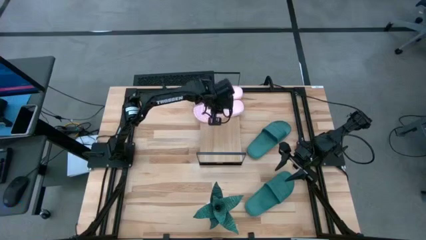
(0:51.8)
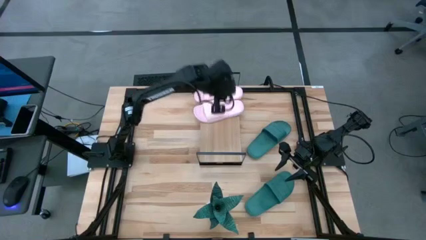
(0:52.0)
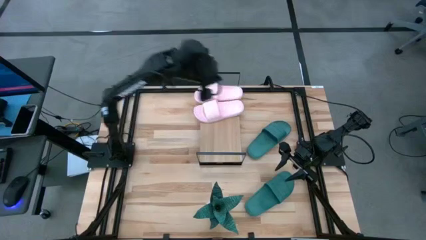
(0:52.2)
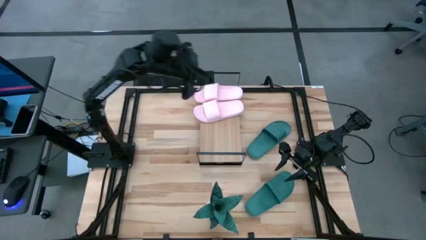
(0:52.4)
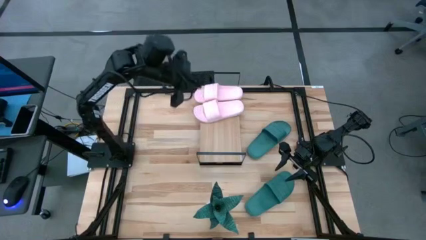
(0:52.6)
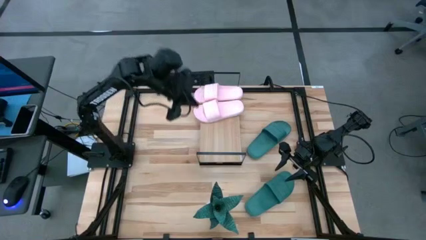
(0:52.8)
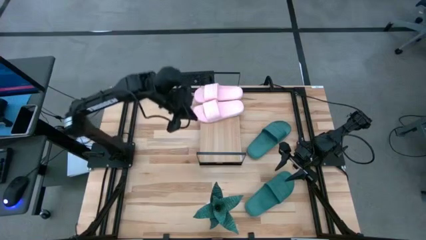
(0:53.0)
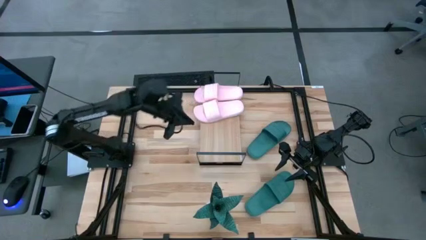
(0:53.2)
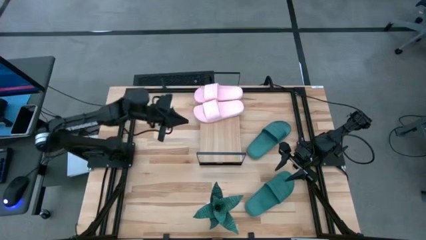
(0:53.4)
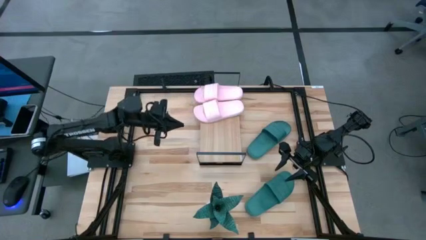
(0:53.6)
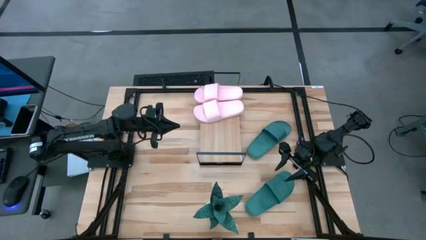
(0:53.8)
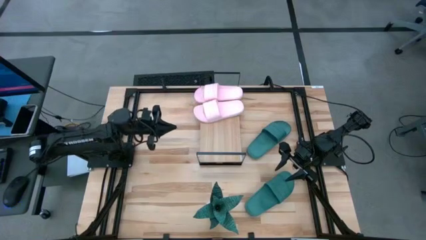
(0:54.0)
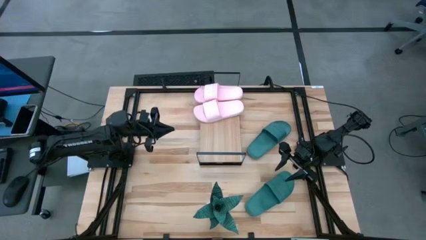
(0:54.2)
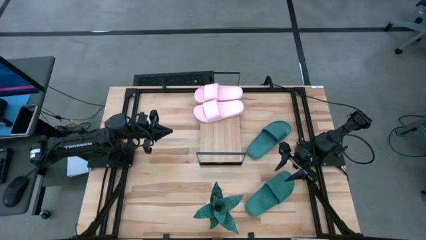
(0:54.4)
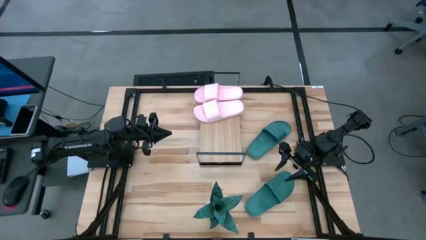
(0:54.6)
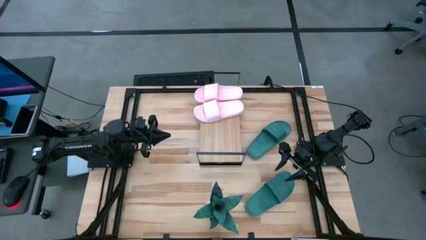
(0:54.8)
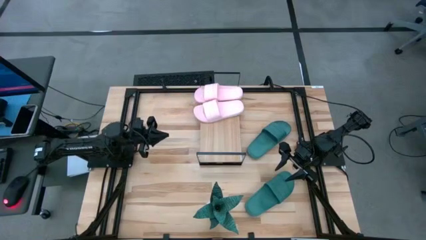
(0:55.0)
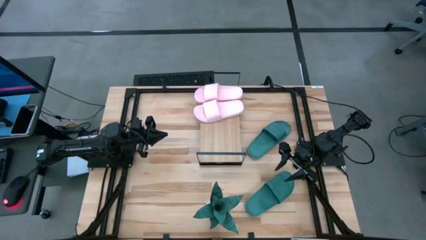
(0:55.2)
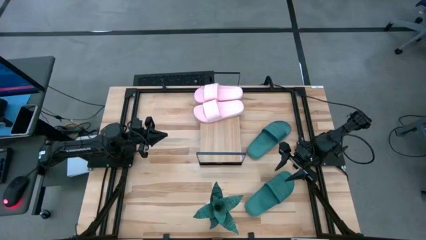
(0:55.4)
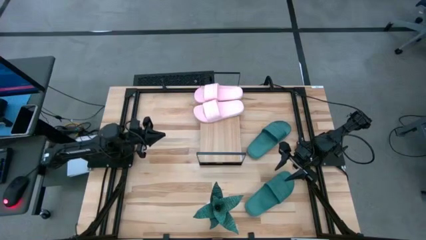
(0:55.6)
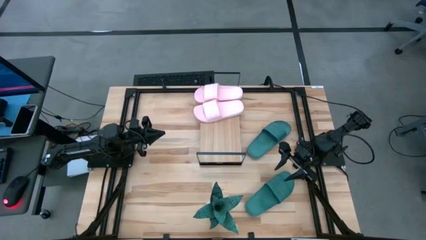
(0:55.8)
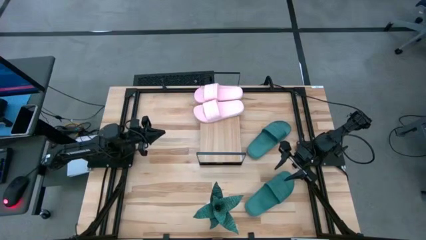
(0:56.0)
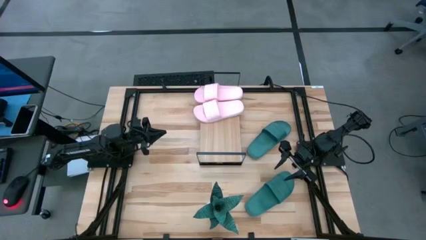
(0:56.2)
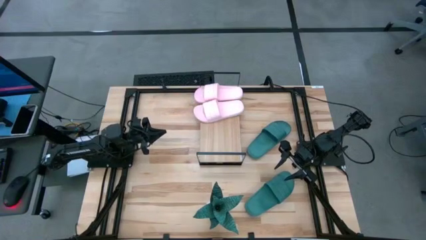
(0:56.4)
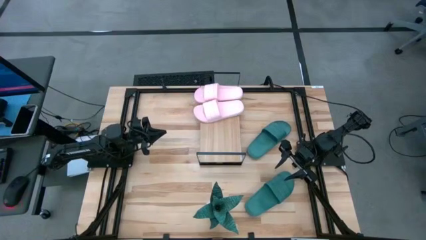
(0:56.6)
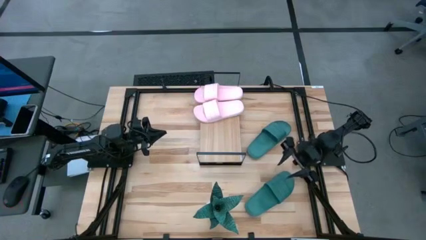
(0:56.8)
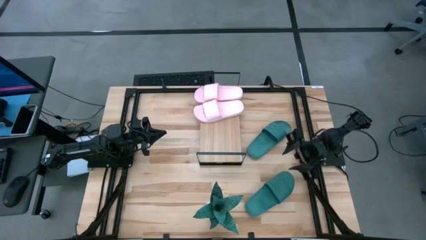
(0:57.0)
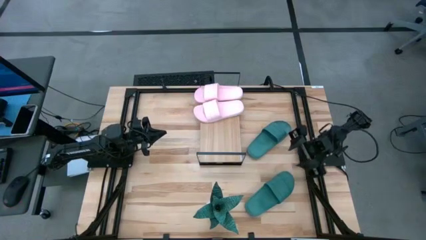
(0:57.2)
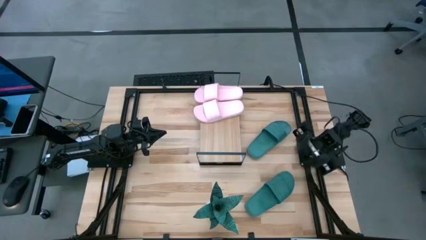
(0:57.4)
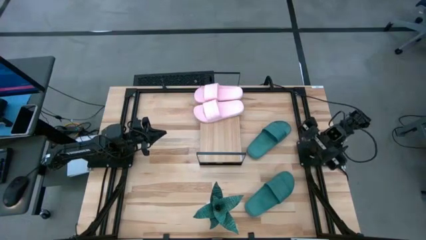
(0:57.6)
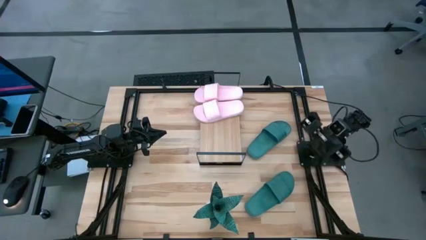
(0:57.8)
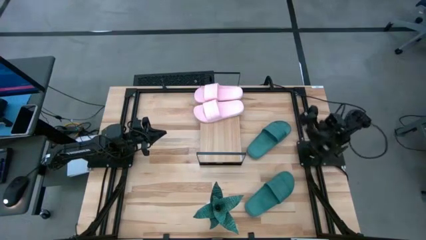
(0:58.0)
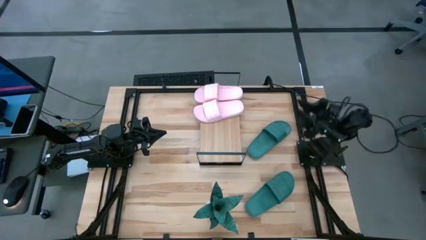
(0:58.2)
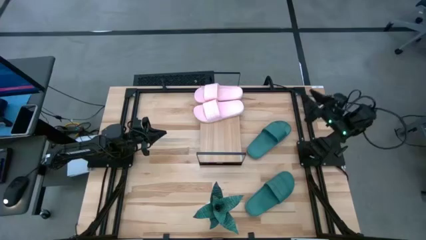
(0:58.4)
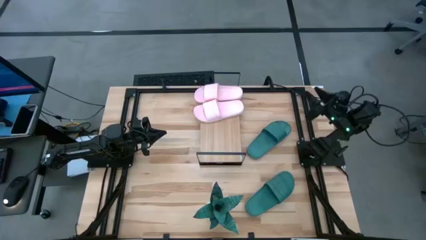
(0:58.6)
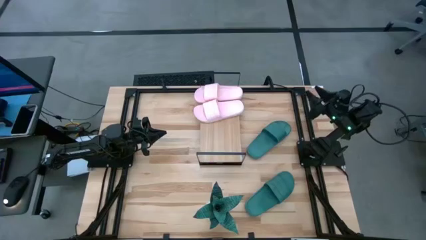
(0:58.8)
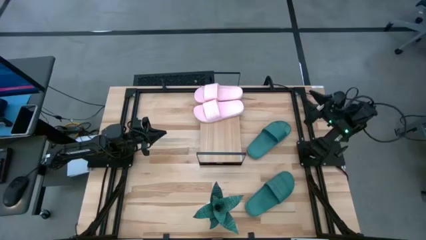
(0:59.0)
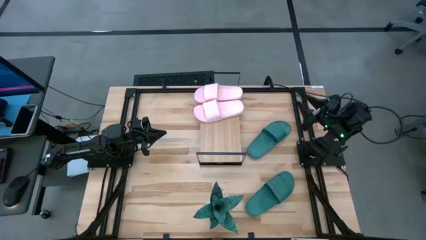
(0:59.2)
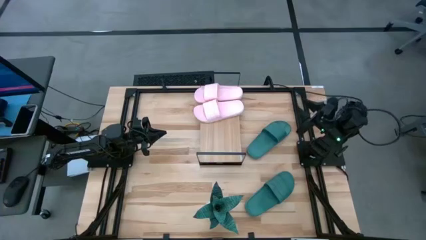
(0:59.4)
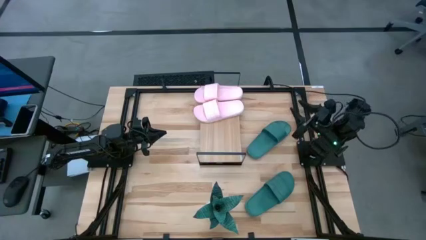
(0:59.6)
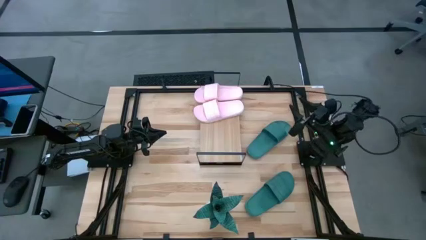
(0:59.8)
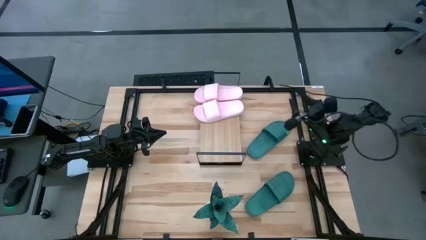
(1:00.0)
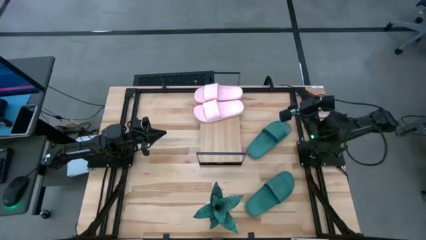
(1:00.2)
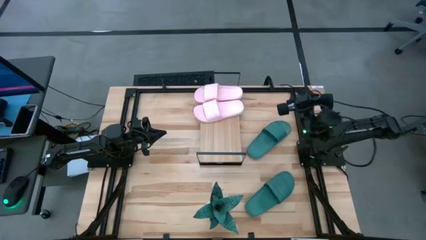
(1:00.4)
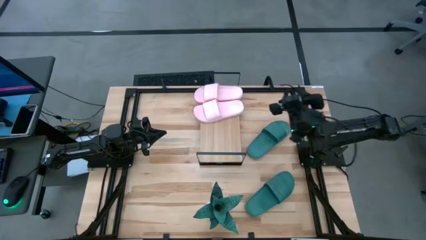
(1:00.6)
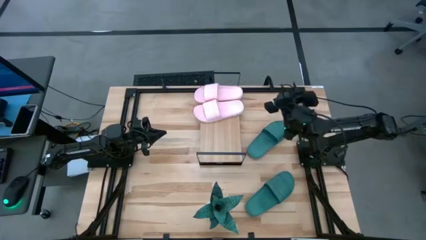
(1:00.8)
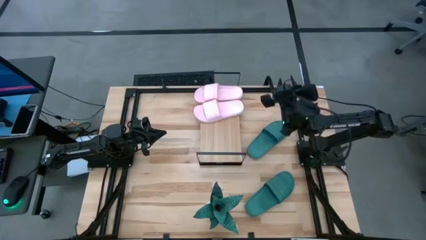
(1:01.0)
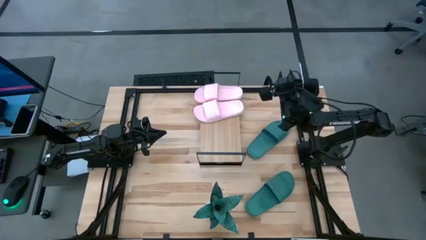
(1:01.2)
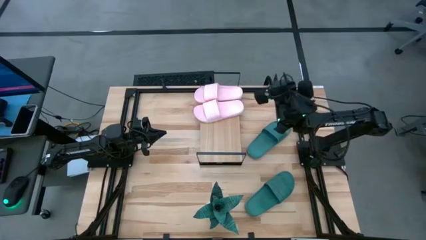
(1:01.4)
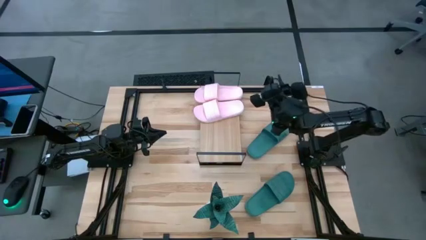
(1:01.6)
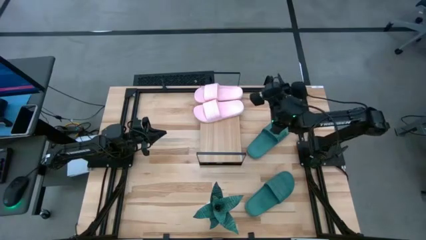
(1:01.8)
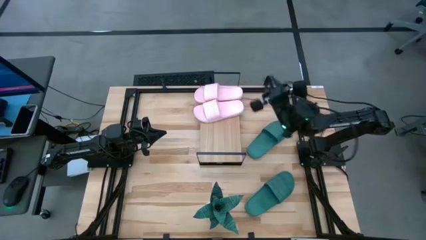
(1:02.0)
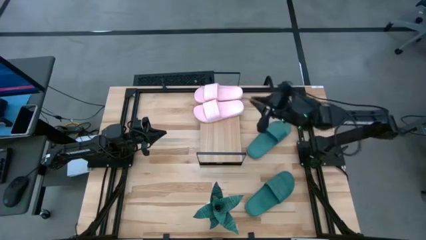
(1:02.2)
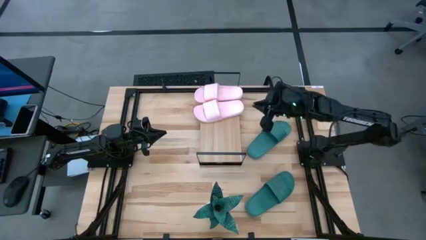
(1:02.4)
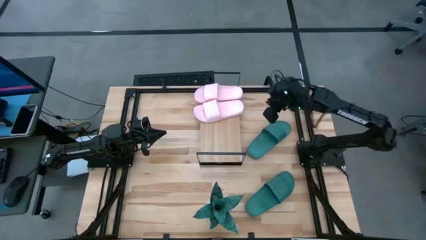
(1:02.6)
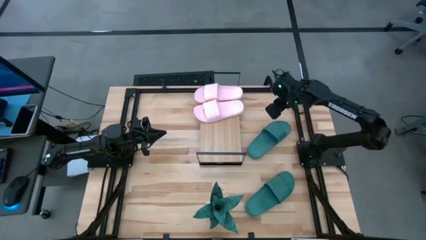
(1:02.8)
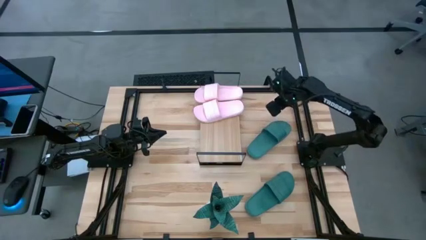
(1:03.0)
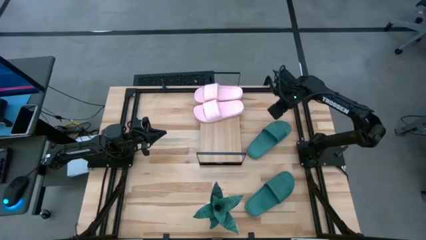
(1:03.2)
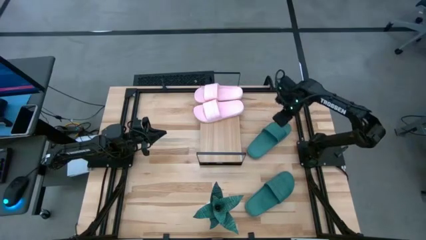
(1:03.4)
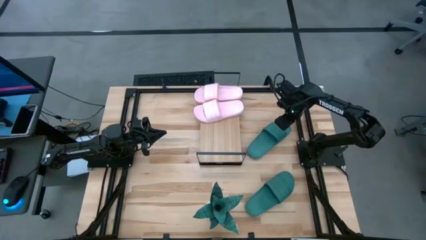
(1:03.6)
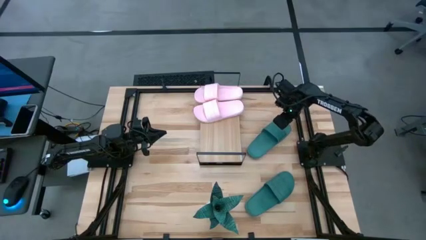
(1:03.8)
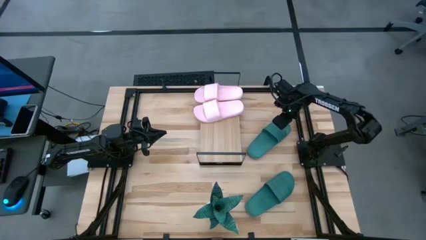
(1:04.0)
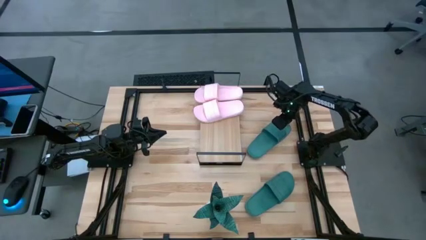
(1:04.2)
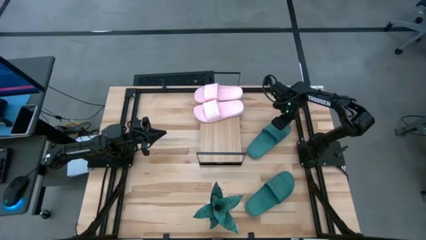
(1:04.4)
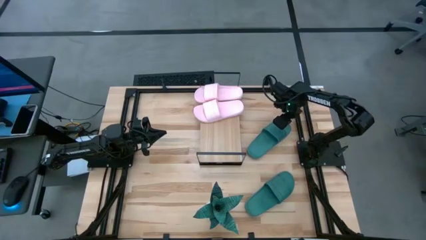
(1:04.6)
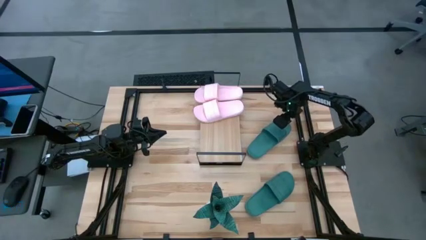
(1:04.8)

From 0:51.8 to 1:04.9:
Task: Pick and place slides into the shelf
Put the top green slipper on the shelf

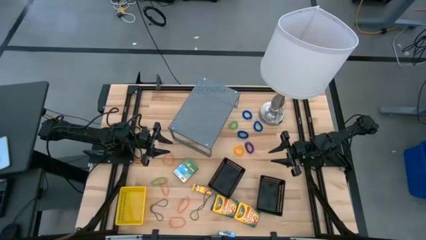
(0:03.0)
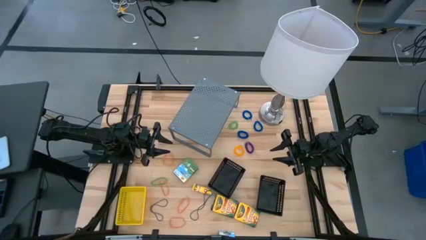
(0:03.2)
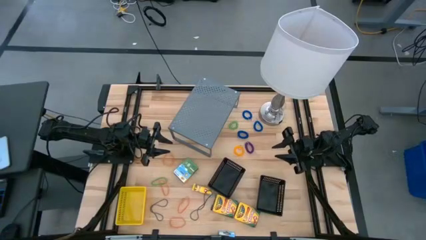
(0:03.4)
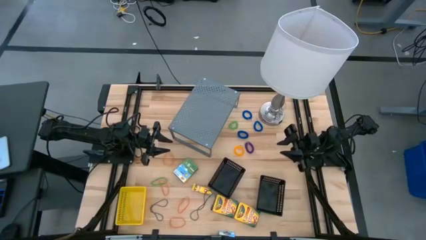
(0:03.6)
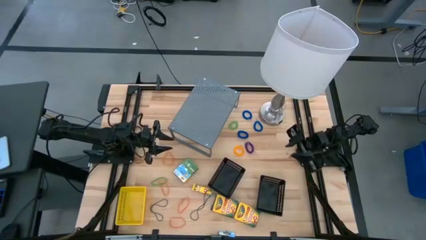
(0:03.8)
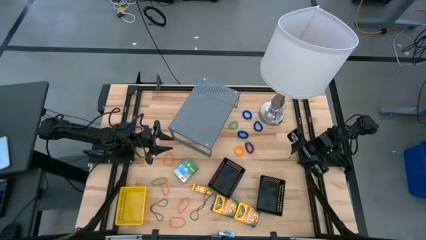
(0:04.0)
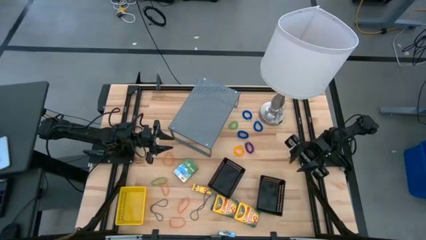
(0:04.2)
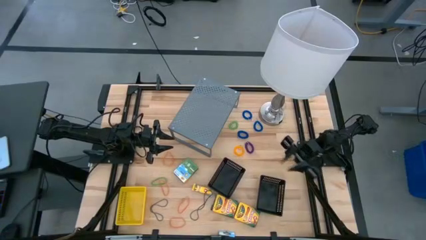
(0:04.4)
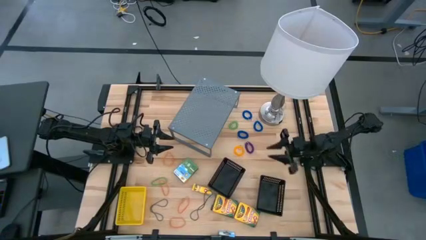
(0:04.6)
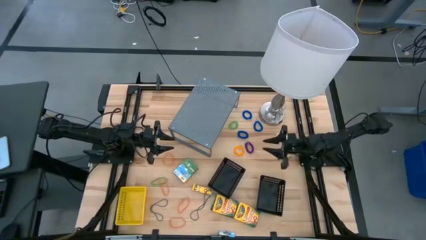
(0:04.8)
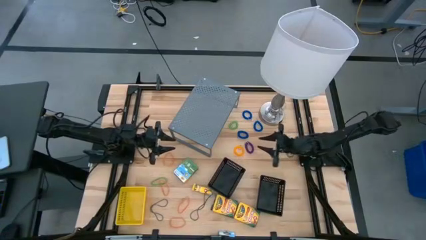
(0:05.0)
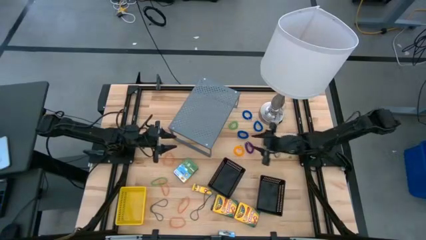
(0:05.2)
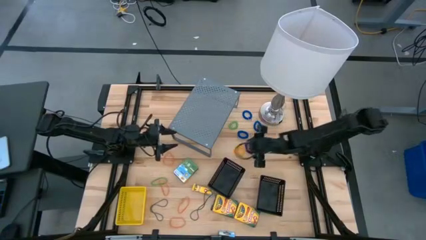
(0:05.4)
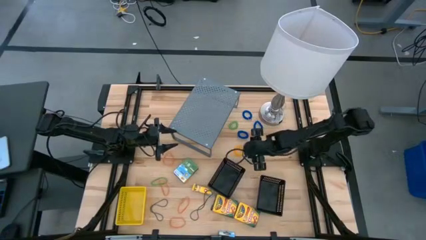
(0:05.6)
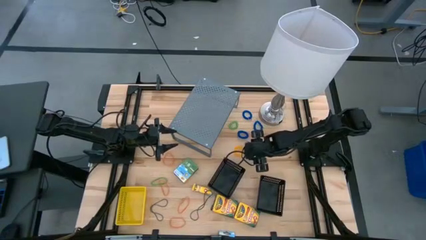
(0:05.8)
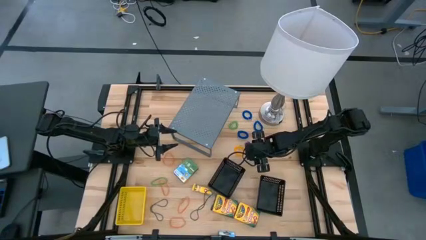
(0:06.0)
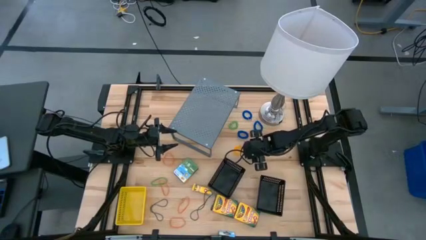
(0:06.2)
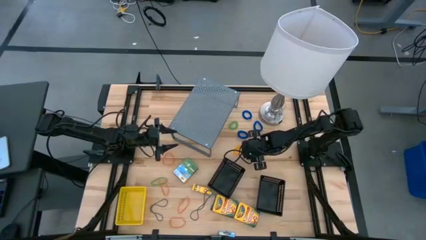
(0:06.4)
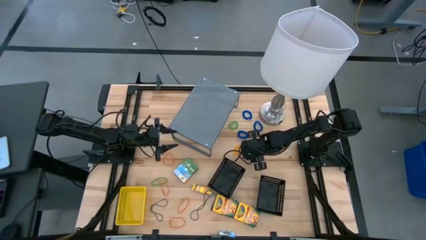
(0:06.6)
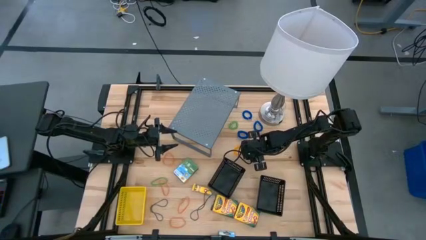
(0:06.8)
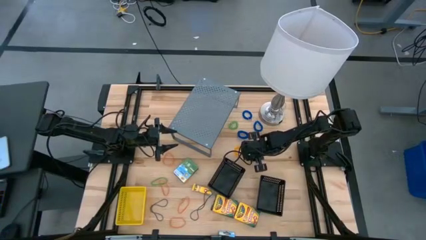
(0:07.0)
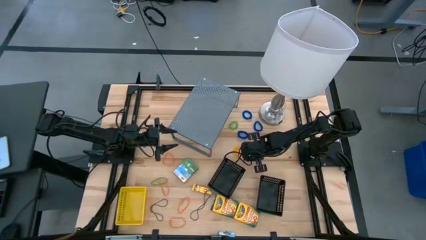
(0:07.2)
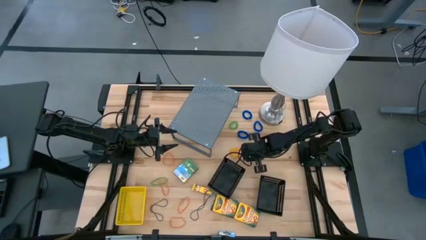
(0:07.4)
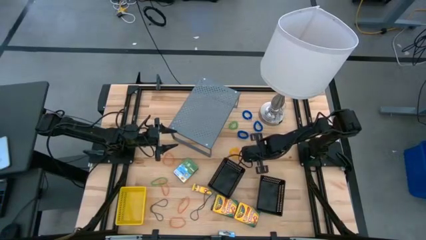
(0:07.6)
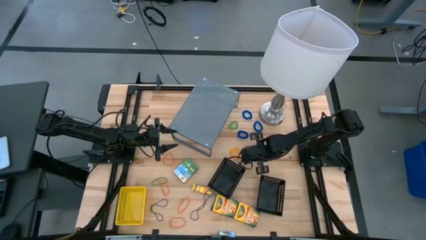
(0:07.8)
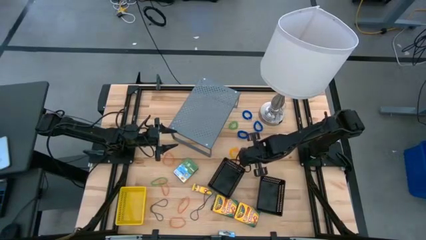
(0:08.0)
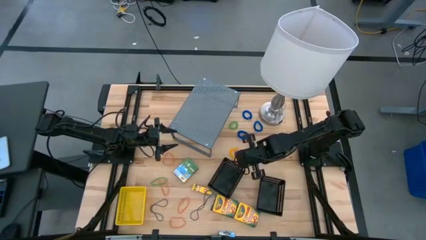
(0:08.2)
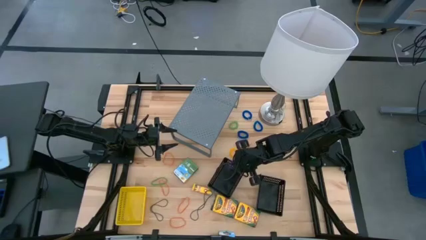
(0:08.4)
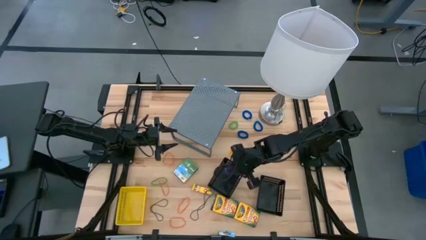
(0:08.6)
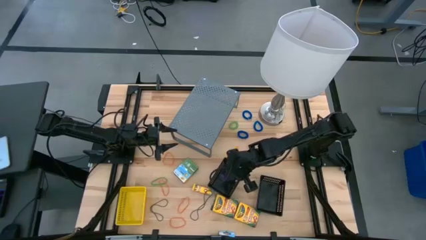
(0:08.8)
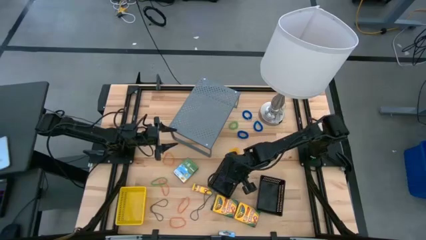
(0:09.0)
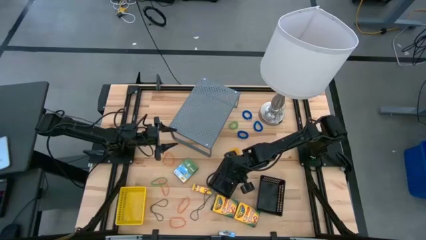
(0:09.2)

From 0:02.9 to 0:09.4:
Task: Pick & Place Office Desk Supplies
Put the purple spring keychain into the left black bin
